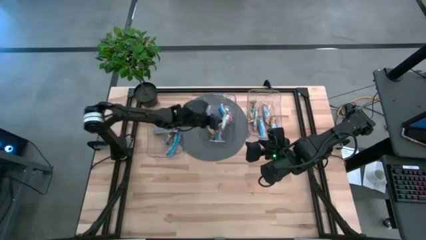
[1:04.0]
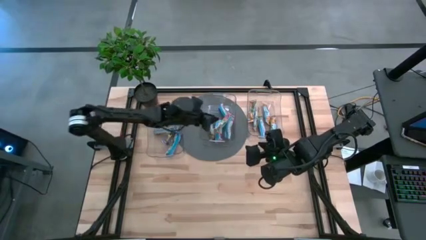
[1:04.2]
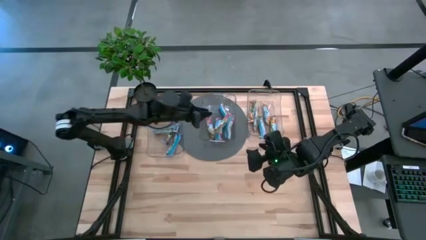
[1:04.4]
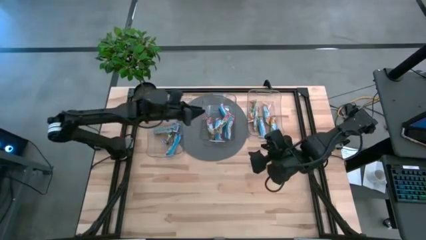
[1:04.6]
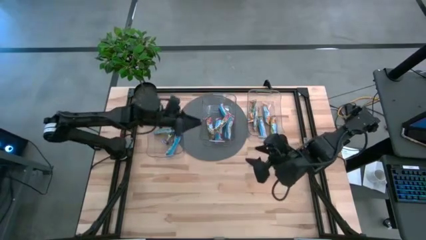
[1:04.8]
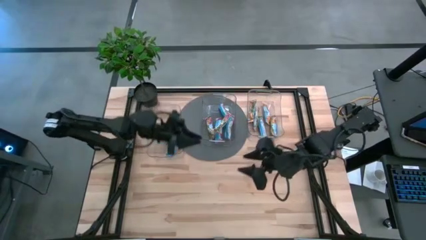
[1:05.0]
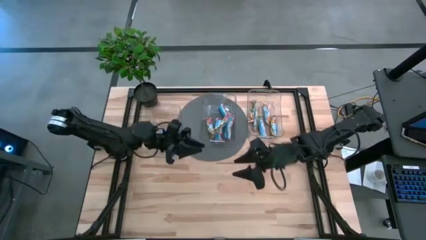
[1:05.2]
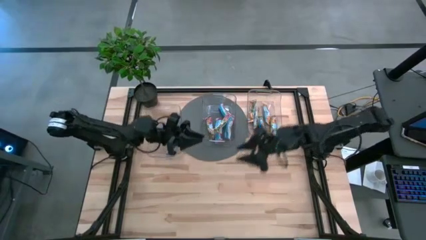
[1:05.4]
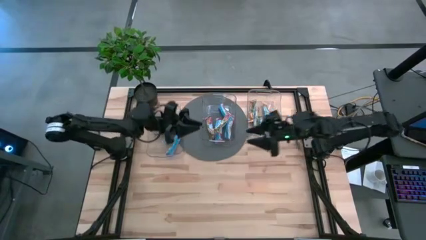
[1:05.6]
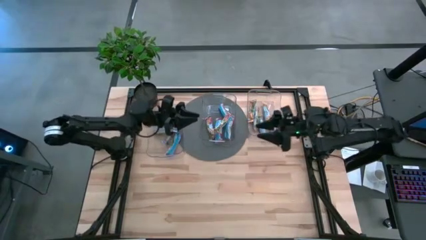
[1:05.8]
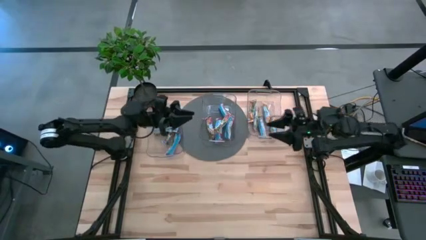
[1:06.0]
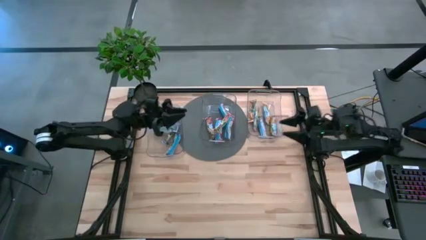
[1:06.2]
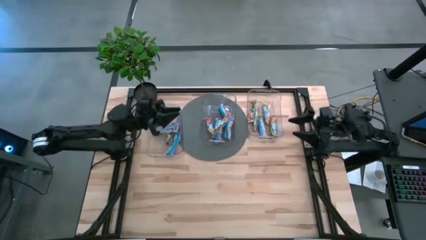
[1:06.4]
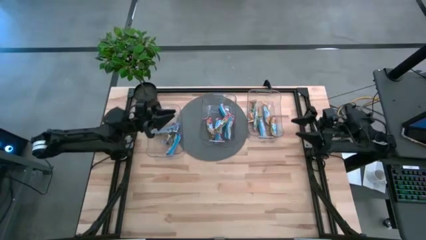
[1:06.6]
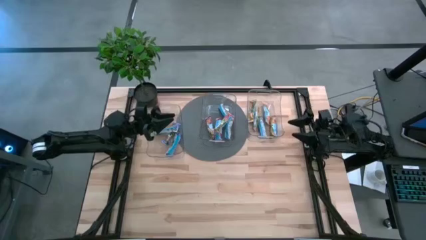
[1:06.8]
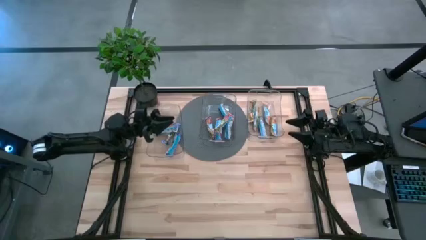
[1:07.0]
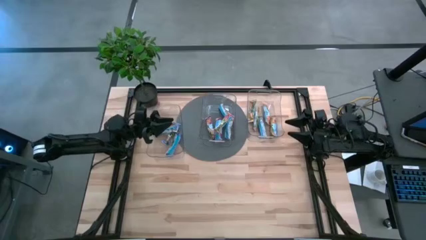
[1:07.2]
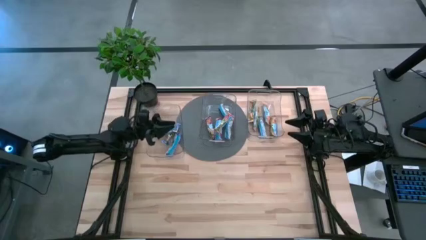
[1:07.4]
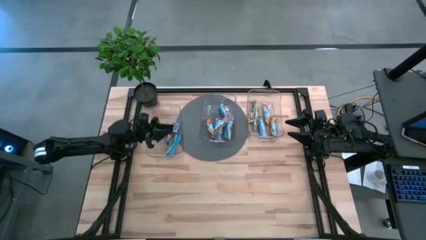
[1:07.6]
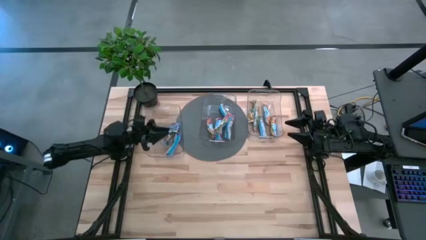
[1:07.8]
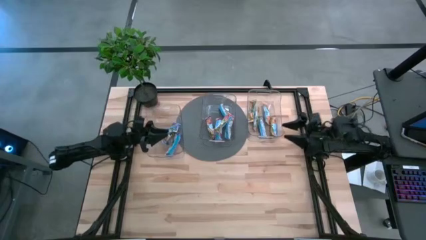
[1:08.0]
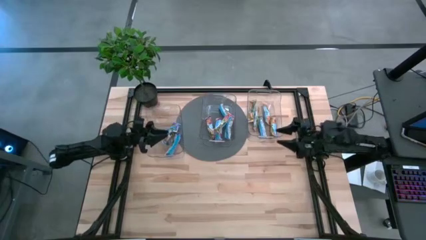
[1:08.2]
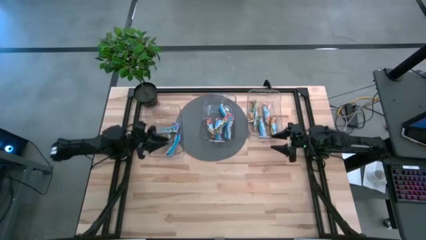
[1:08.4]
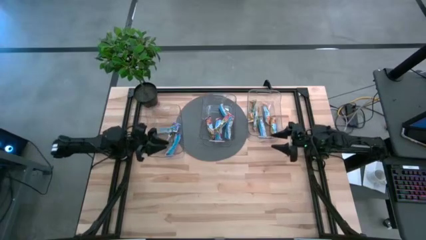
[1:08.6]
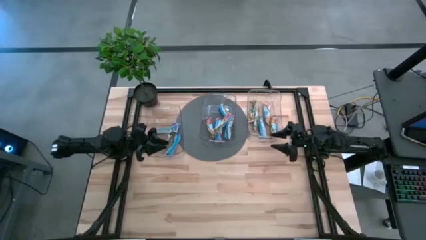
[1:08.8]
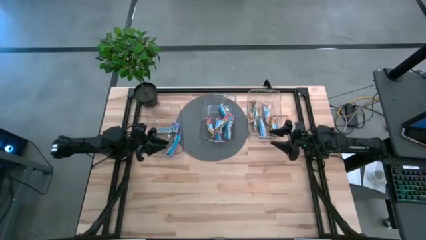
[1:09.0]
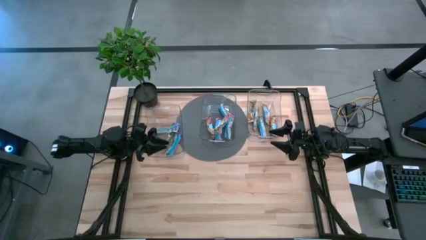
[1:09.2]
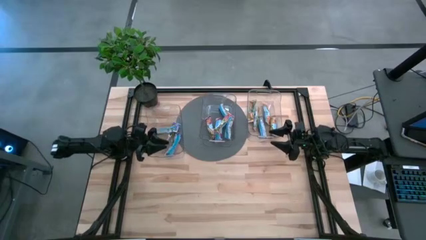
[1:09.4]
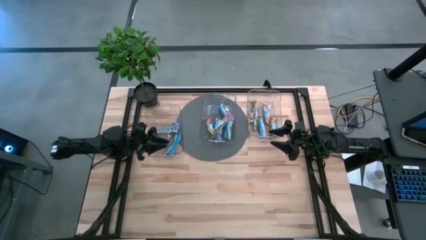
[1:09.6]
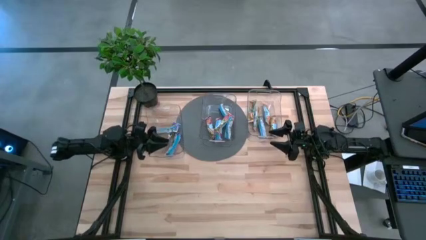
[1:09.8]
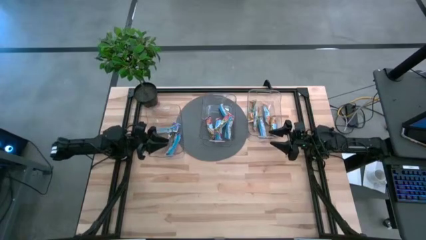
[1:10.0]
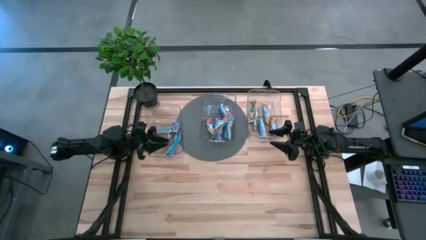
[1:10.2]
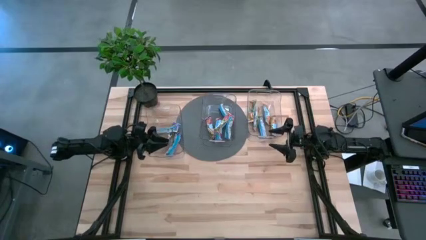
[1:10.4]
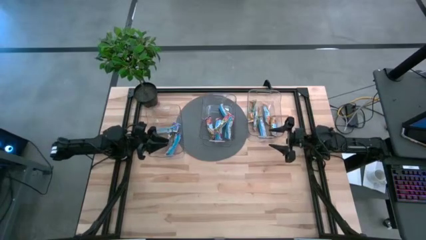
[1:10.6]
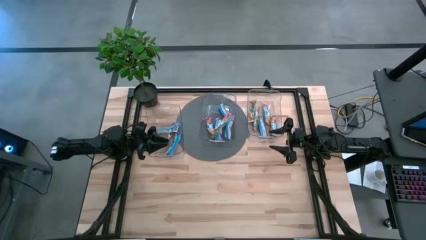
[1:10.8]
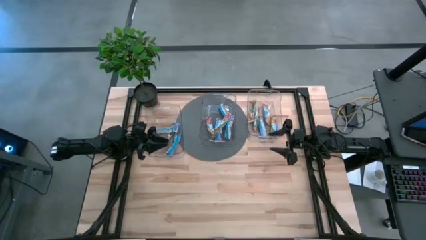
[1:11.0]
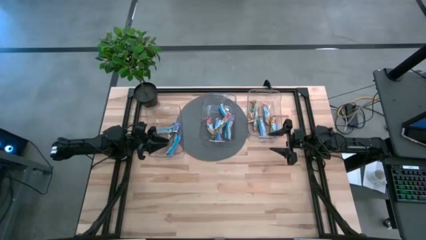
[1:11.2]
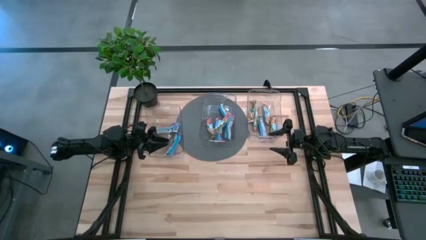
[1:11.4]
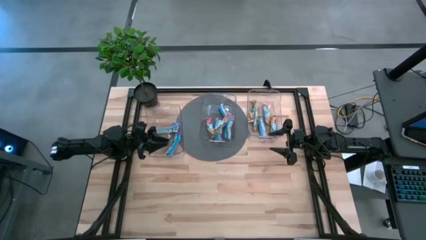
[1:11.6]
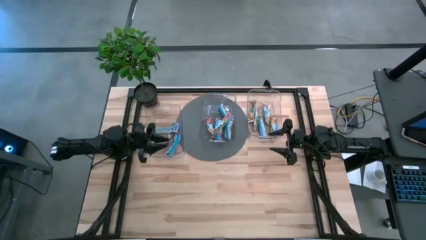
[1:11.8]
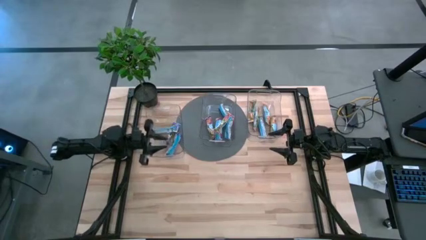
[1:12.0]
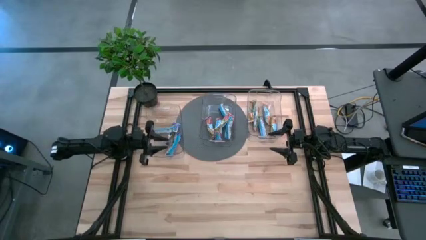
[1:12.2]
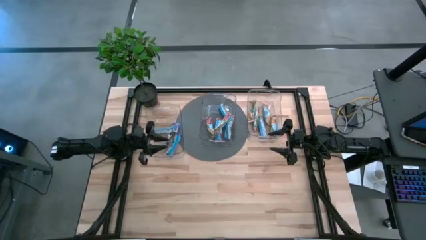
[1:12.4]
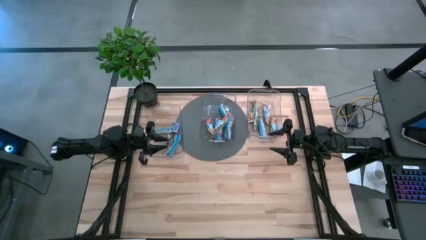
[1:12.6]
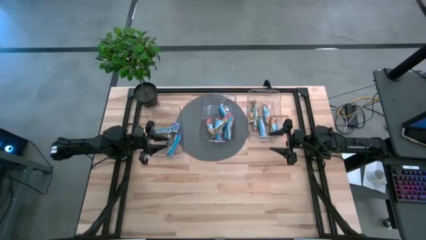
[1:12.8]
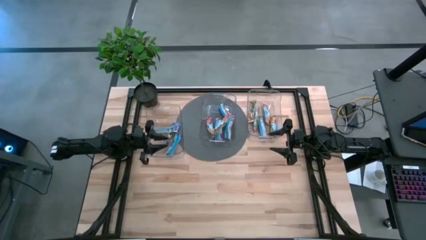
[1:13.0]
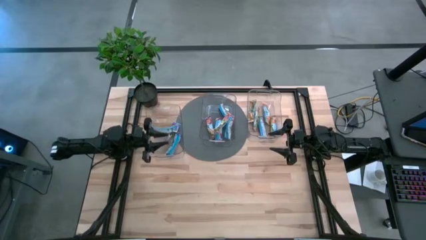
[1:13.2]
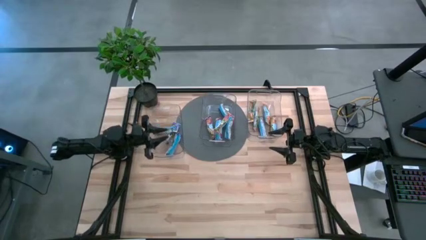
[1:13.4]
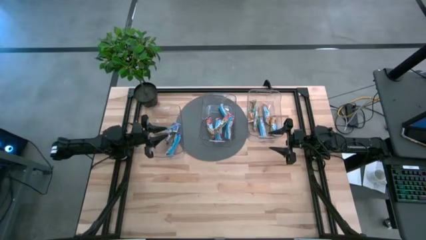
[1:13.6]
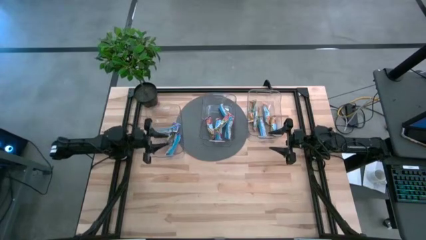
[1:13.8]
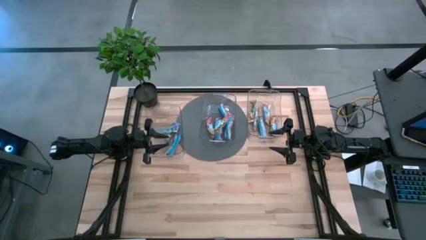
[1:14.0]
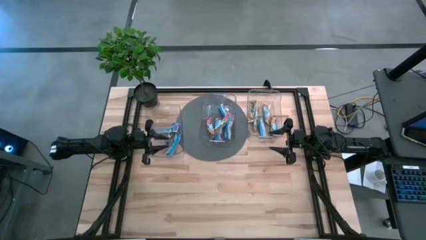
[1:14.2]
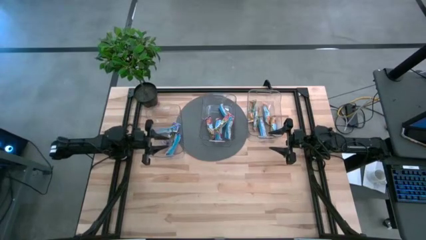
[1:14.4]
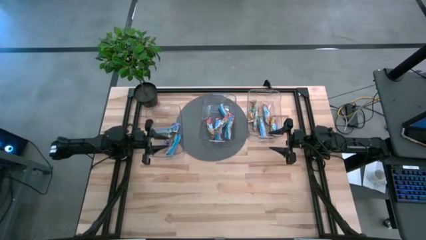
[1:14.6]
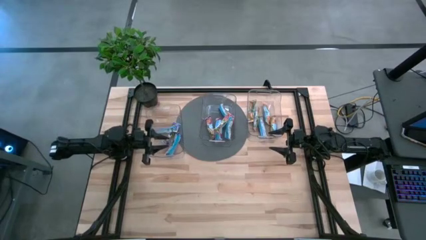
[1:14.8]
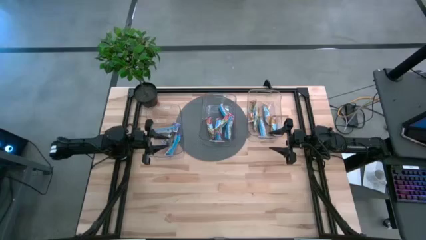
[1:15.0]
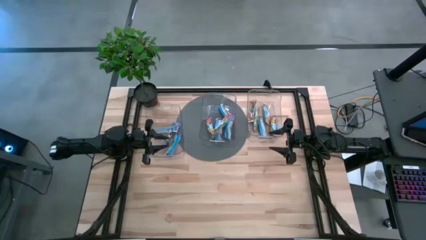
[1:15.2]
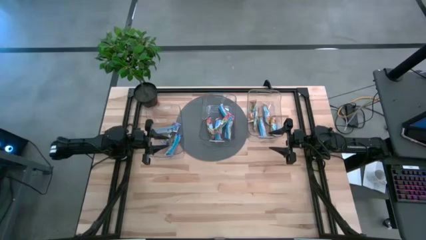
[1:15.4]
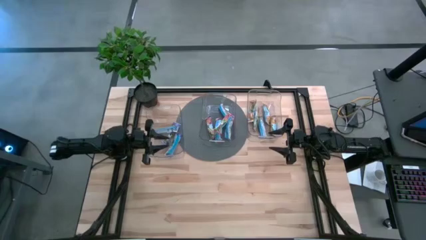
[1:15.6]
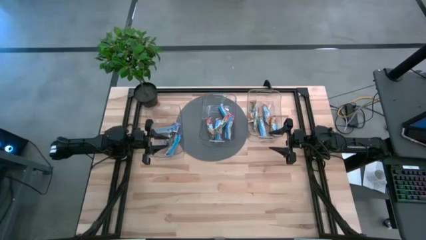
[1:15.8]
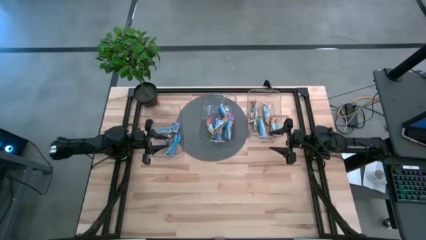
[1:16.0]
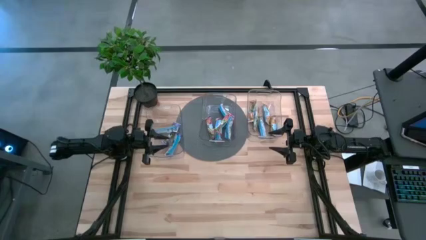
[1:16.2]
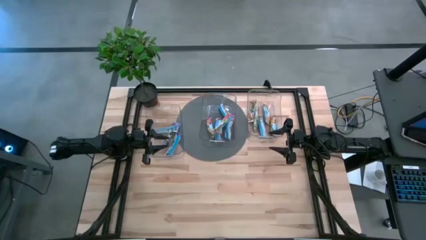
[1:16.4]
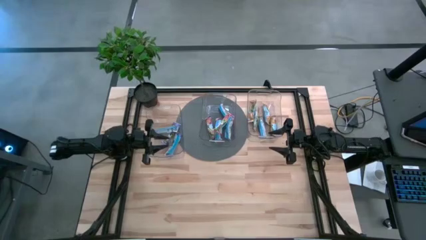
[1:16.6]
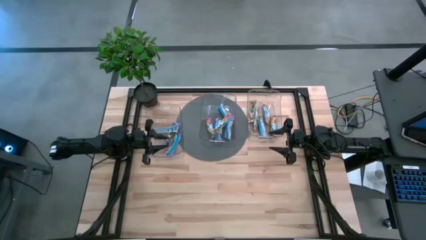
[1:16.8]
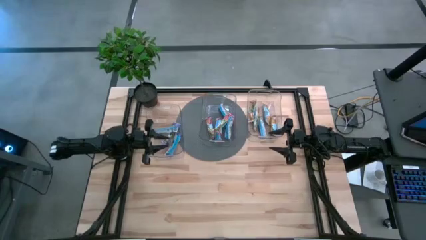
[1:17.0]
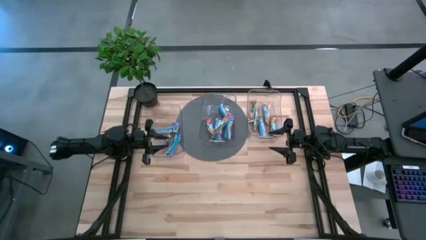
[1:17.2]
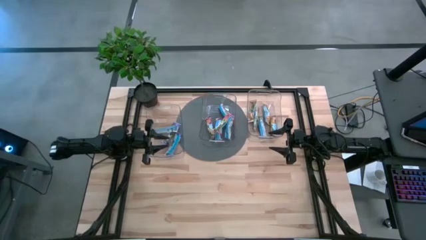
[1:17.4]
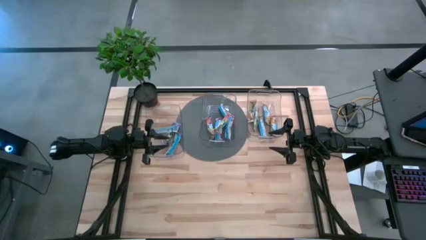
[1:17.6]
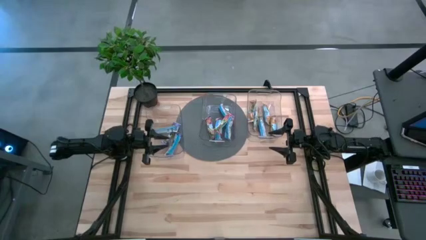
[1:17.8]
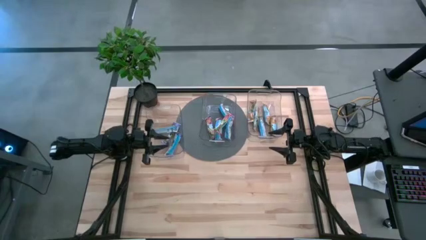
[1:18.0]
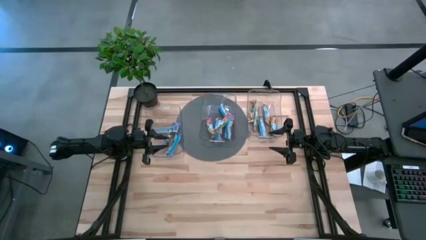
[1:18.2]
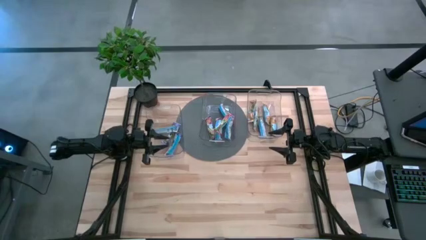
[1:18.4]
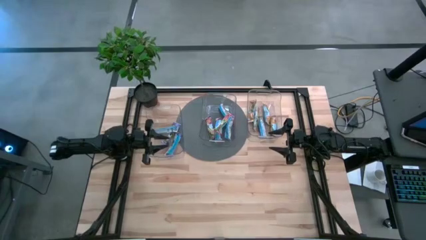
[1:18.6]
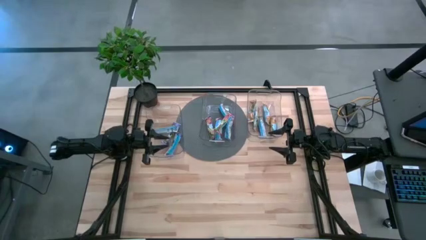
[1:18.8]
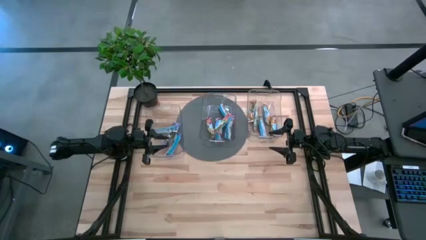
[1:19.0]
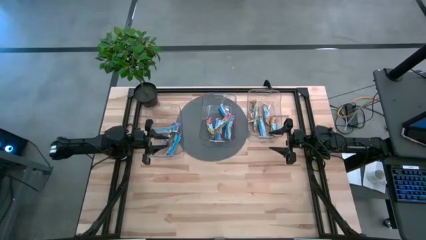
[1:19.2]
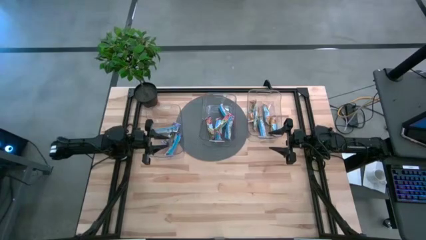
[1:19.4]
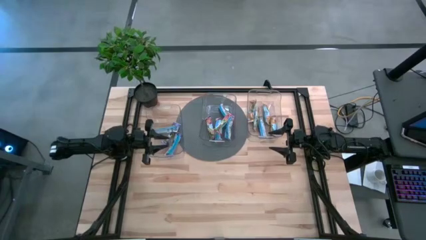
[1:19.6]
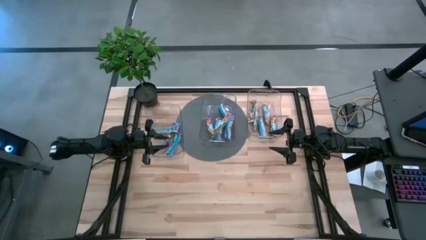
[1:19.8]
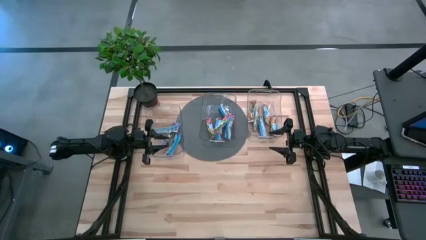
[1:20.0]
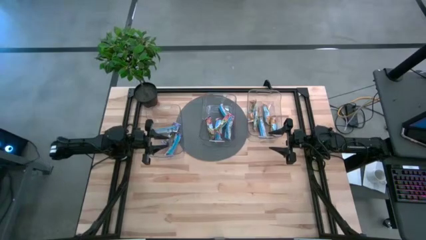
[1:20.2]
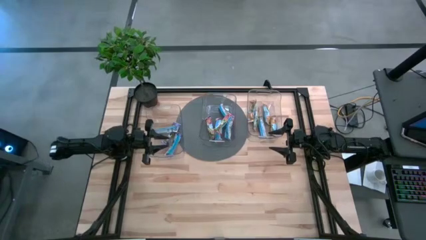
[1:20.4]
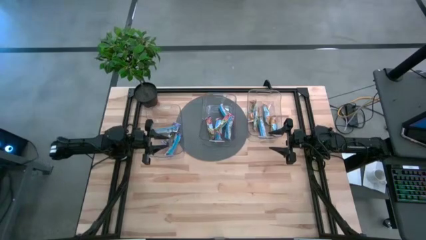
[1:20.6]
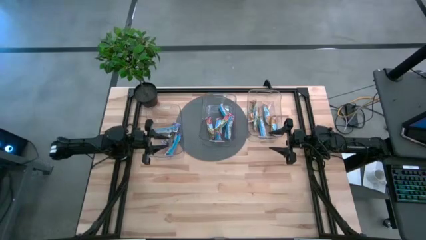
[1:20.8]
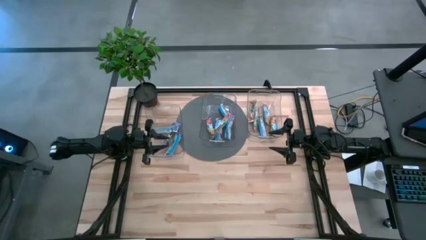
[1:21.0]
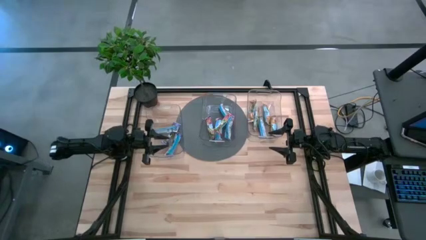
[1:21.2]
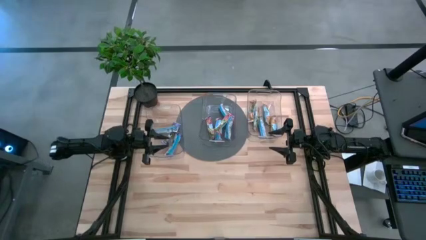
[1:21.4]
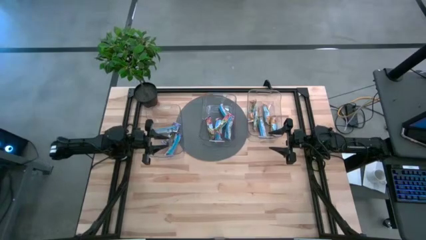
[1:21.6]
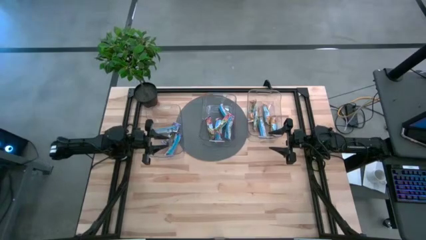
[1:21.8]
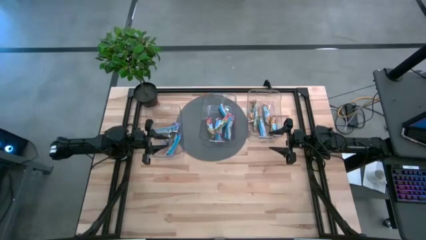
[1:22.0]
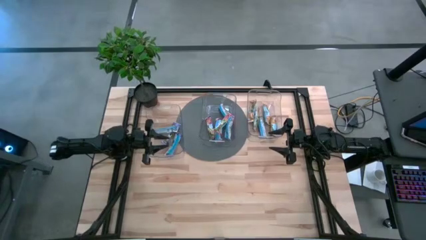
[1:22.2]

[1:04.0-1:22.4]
Task: Pick and place Granola Bars by type
Return to Home Position
